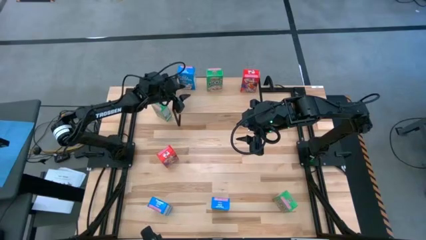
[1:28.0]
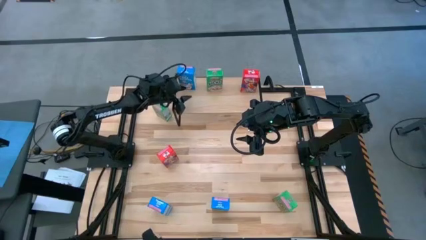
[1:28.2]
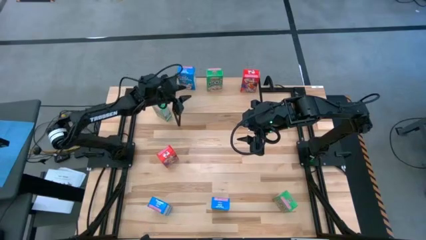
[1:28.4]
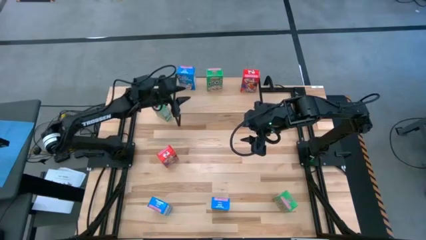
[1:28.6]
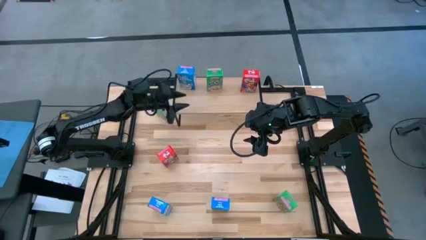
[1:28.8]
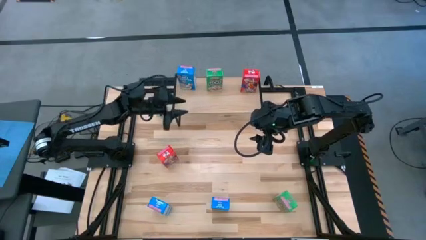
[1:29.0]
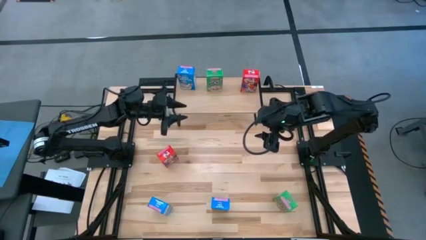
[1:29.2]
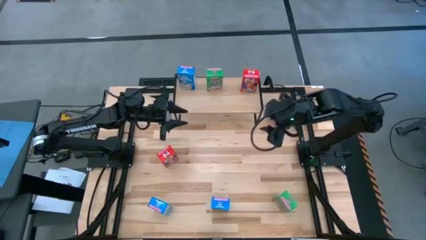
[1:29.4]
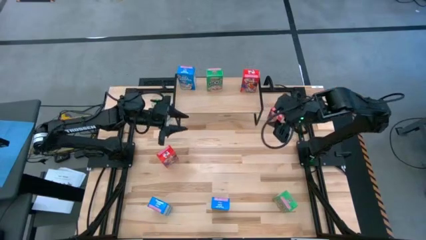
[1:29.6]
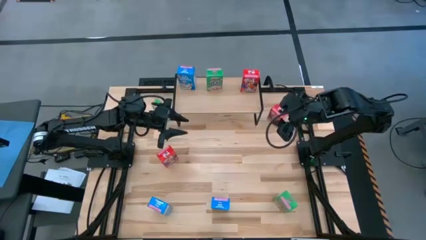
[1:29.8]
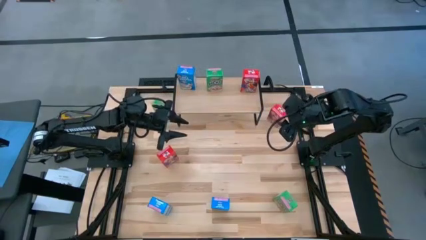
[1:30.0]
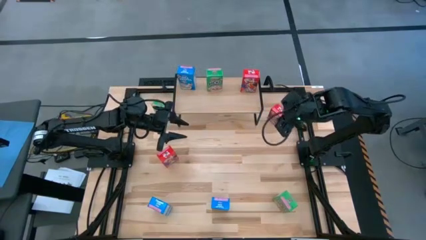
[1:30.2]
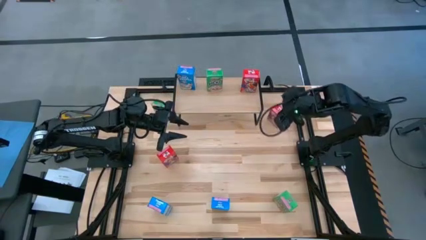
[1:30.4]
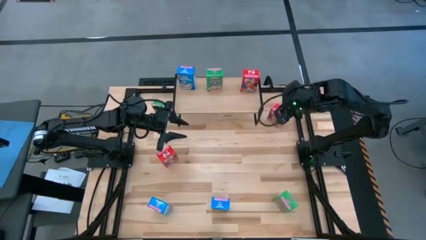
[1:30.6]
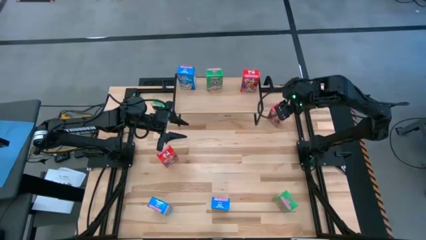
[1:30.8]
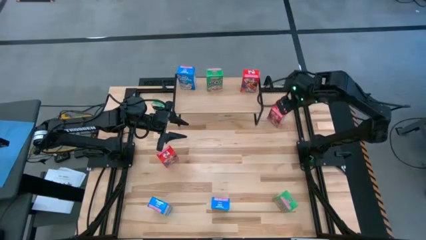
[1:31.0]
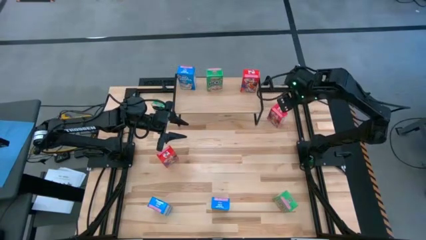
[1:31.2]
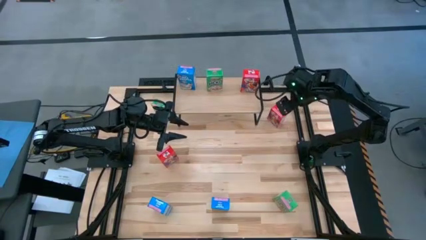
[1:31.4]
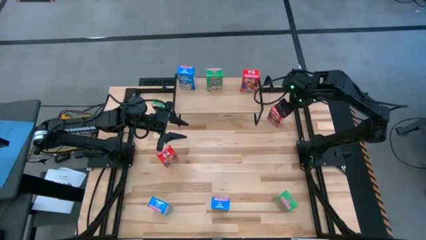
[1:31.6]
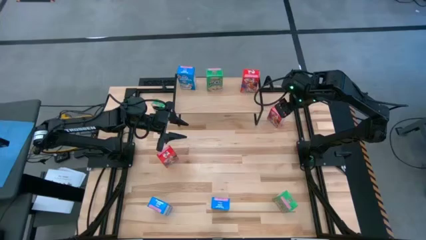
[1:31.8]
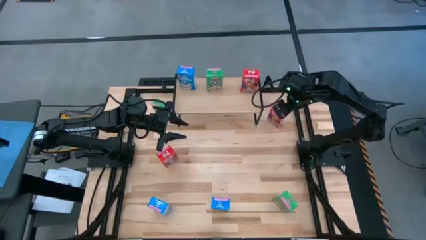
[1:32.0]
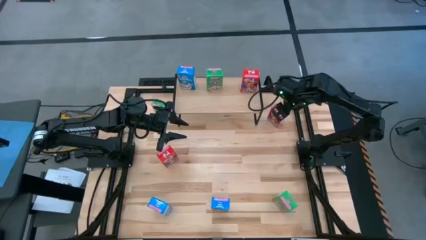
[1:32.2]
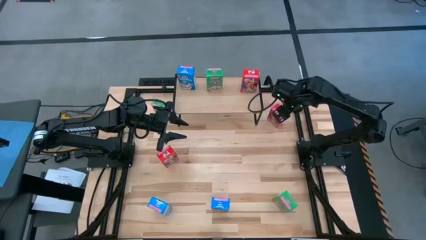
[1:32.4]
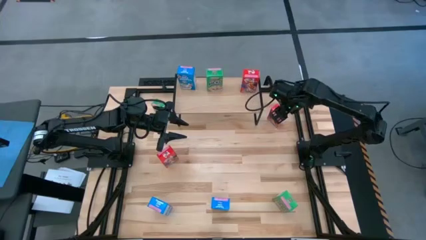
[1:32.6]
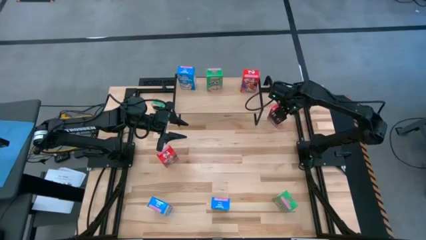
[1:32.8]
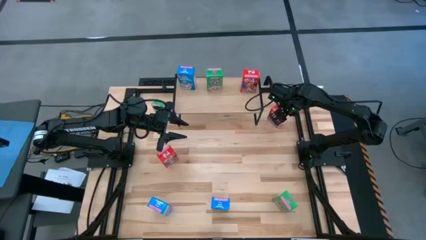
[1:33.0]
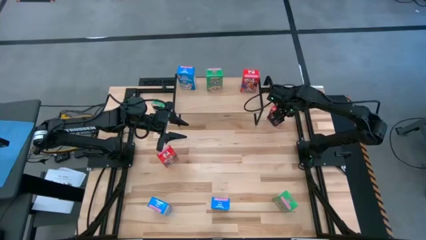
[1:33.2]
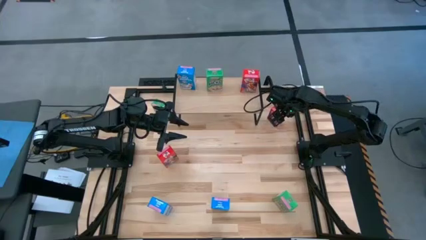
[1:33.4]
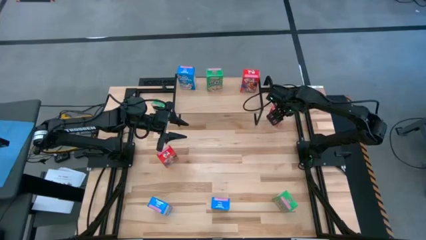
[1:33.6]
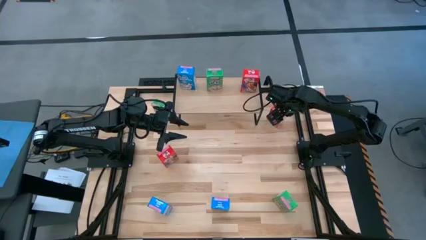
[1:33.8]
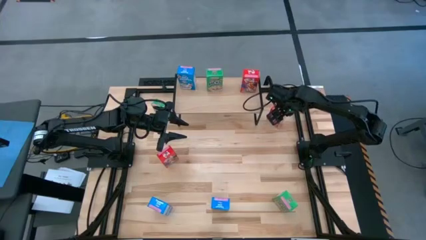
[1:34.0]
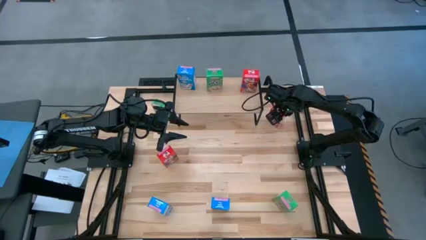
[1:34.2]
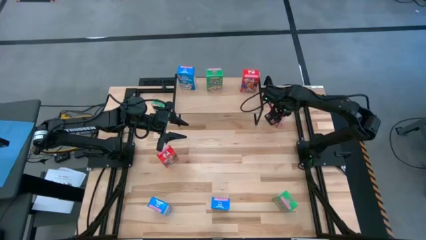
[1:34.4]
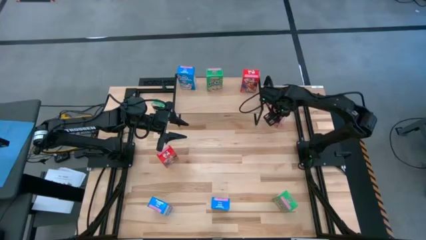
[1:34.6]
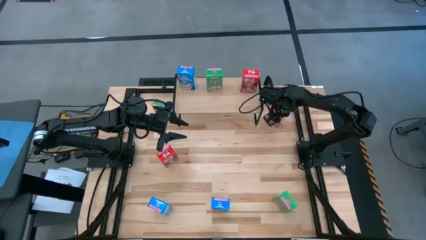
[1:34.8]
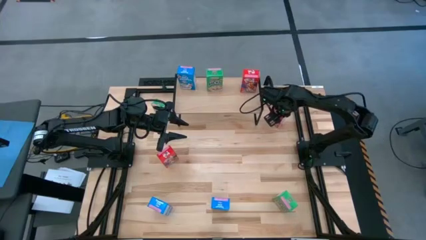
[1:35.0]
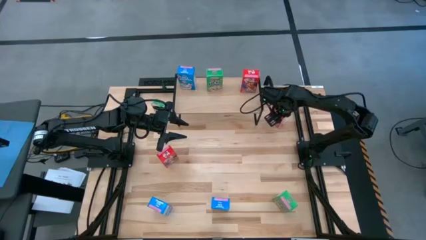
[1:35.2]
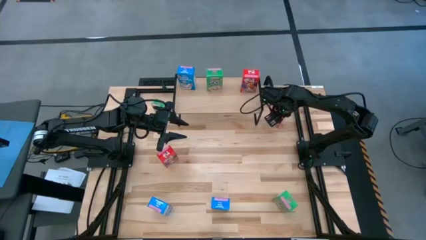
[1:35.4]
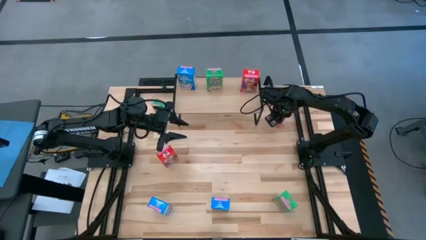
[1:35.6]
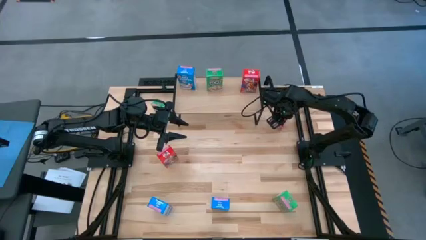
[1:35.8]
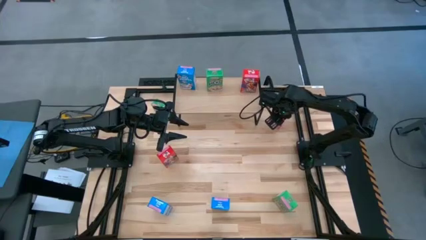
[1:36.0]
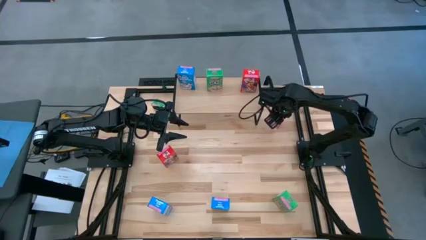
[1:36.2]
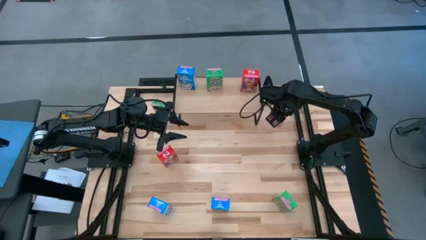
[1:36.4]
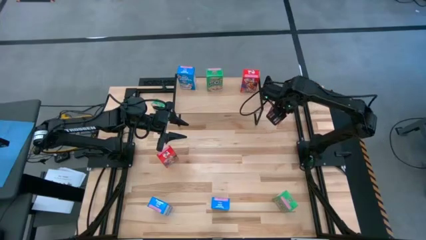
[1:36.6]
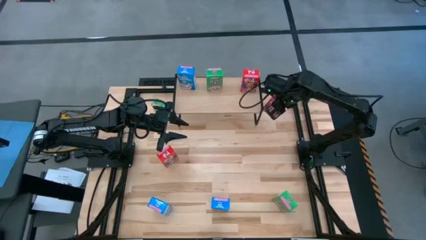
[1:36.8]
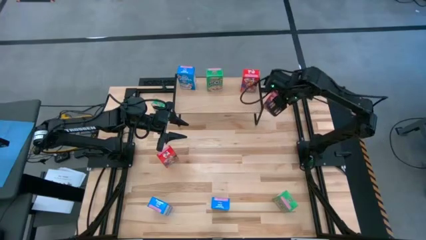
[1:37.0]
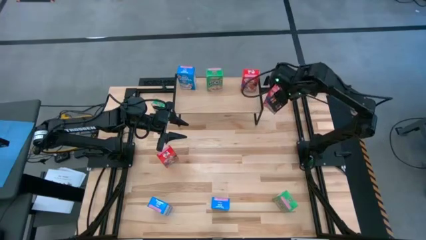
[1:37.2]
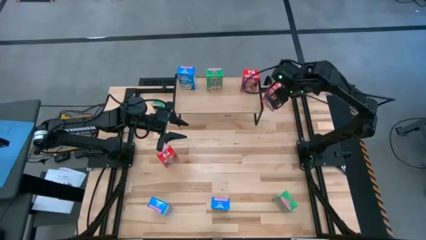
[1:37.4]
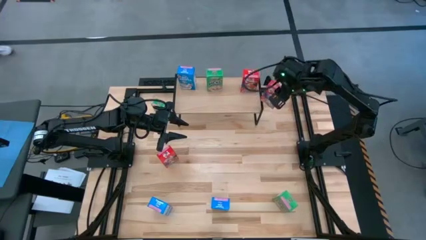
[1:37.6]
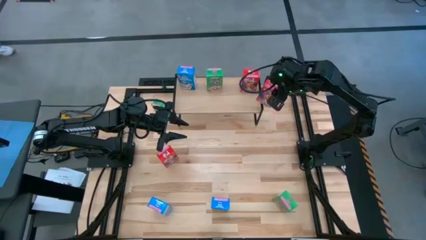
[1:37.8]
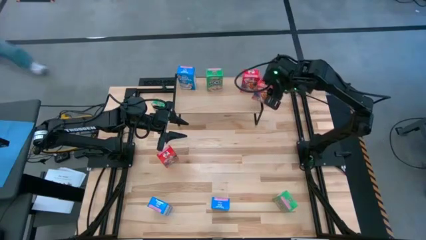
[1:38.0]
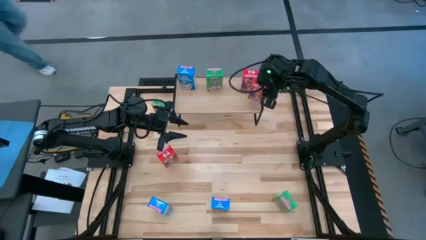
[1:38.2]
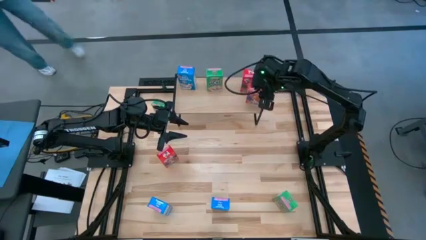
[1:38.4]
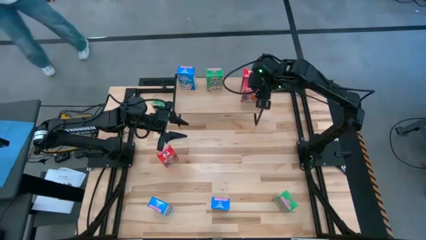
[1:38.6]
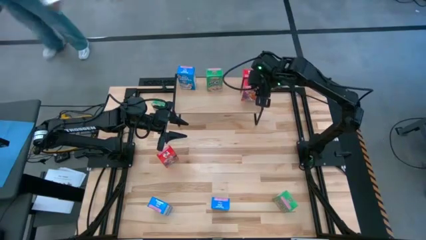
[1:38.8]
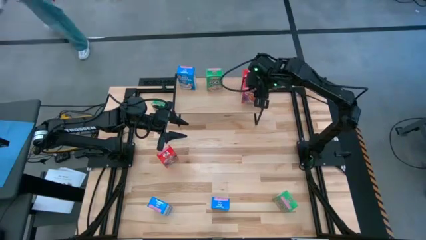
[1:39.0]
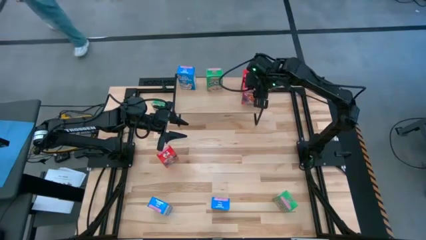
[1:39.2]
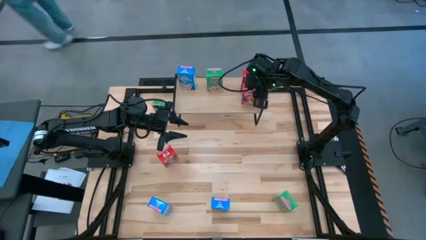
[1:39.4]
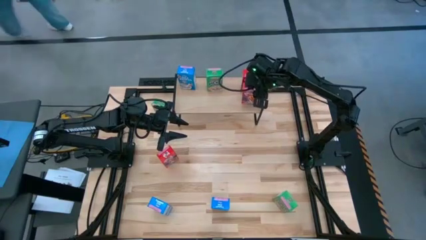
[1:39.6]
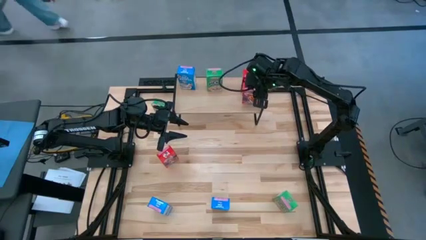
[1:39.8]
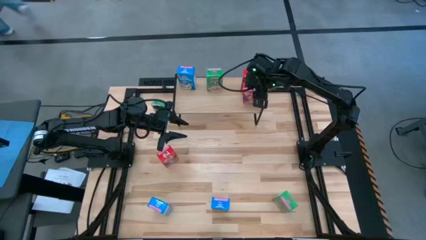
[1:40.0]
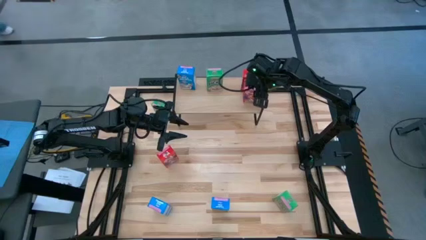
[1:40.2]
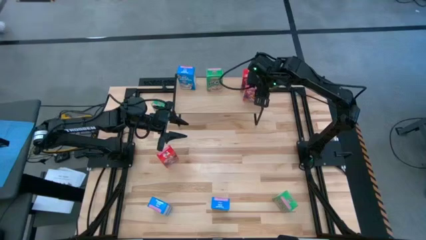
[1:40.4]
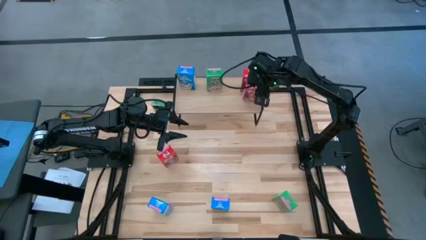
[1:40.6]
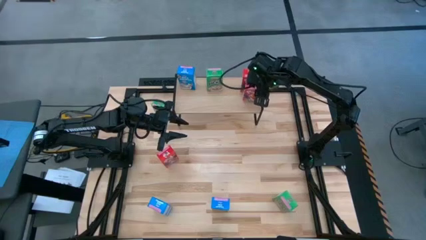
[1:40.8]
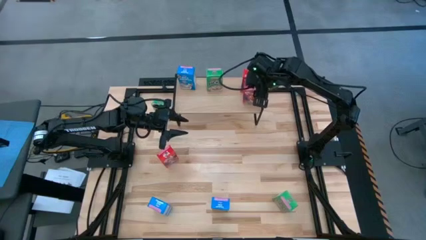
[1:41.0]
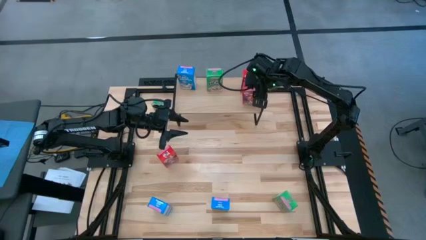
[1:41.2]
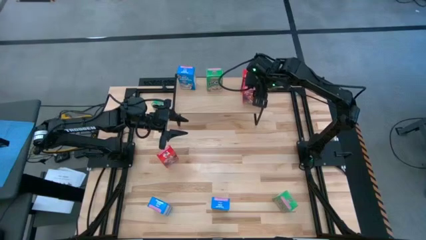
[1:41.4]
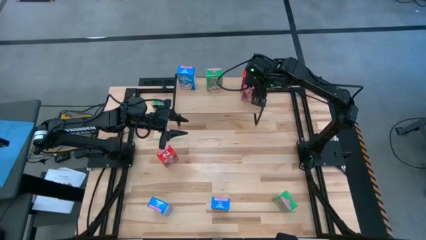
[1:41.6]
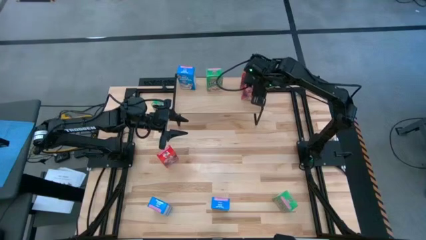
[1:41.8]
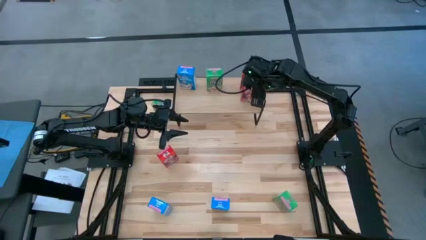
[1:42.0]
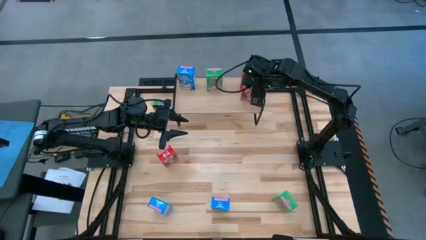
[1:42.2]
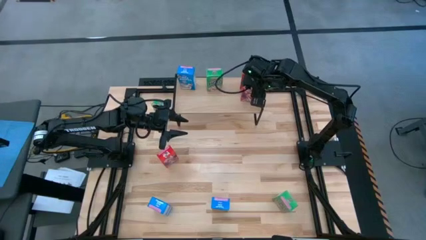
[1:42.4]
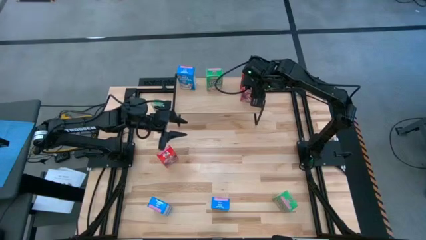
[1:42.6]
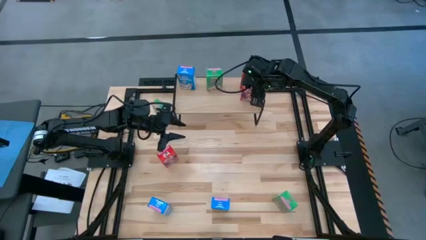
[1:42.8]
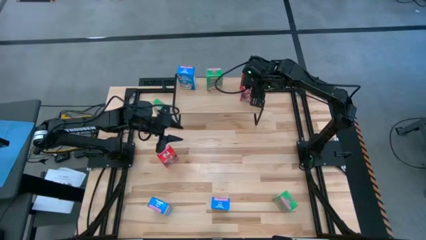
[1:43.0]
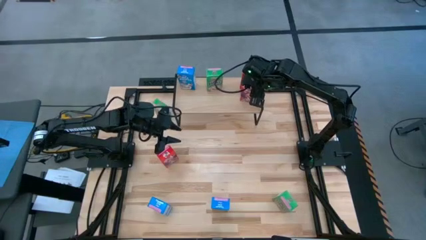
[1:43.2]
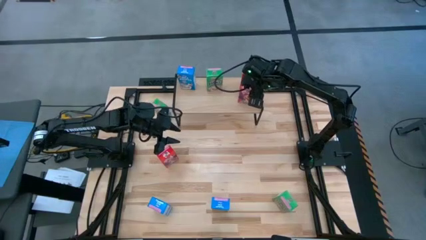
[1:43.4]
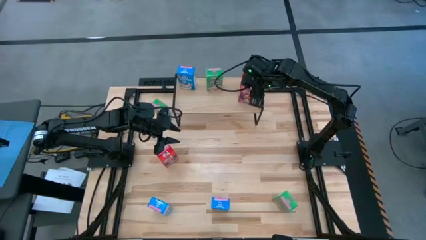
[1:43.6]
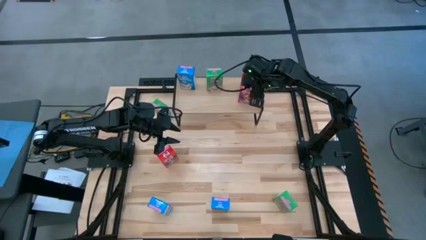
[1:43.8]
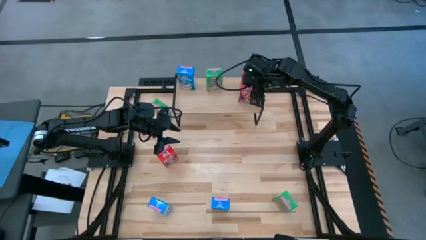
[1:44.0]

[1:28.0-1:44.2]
Task: Stack cereal on shelf
Put the right red cereal box on the shelf aligned with the red cereal box
